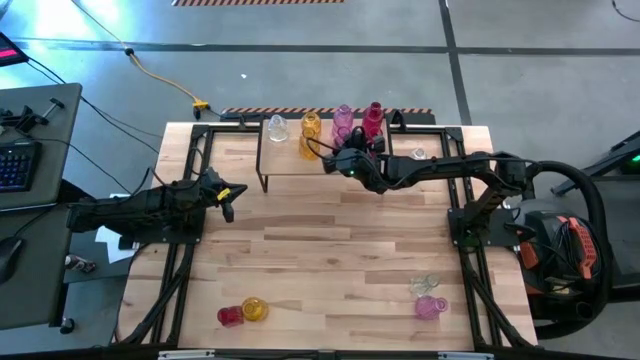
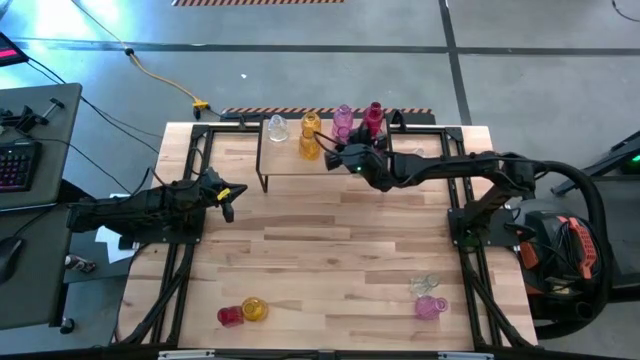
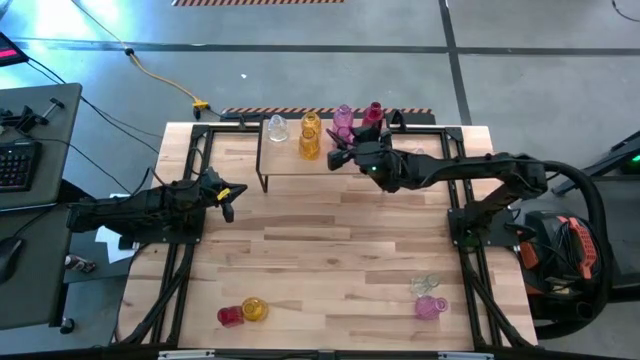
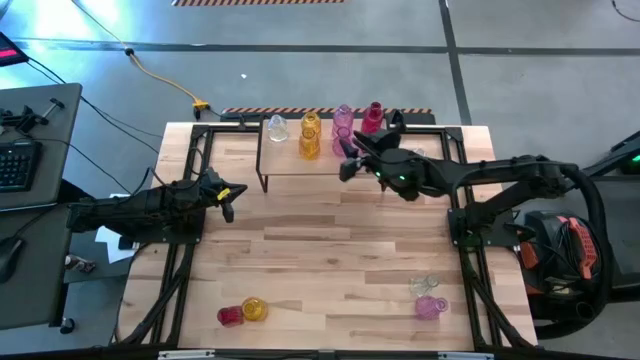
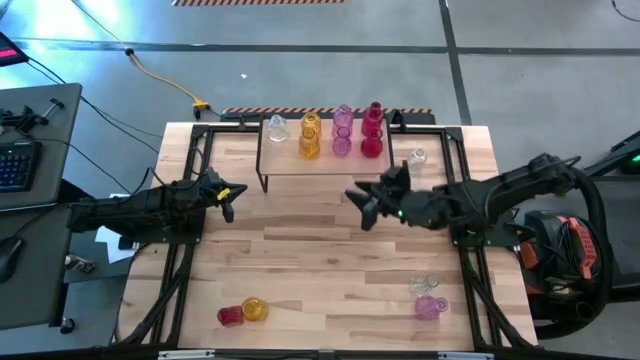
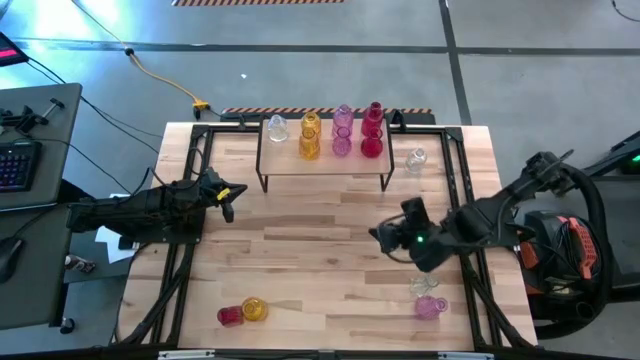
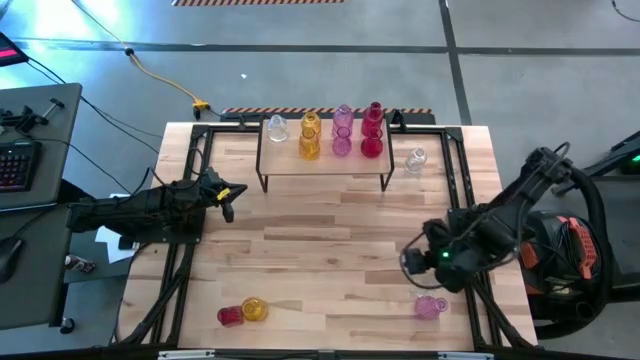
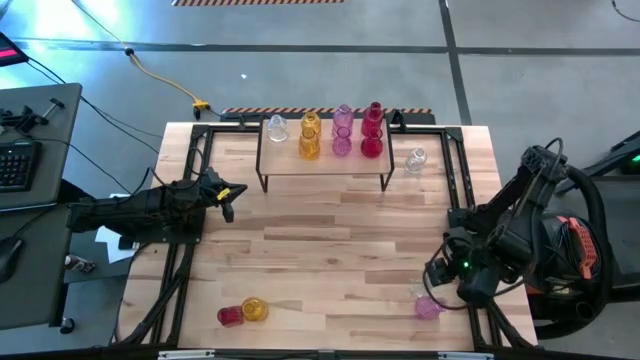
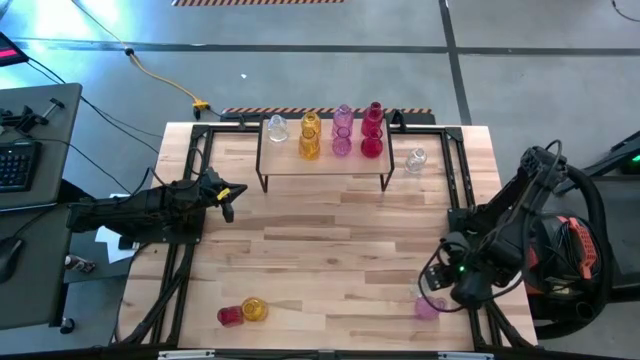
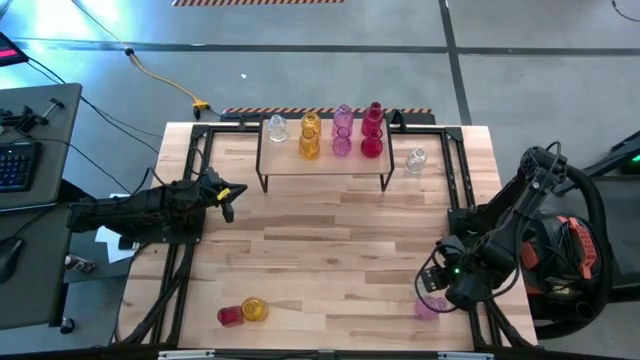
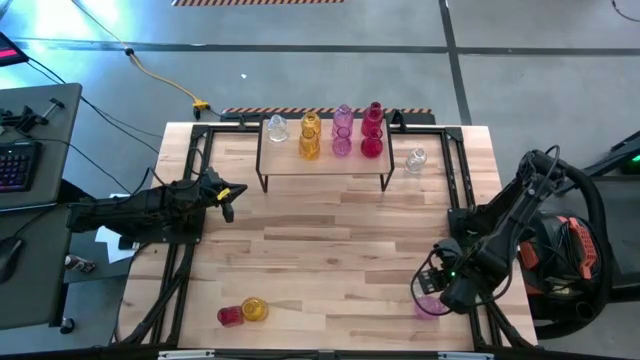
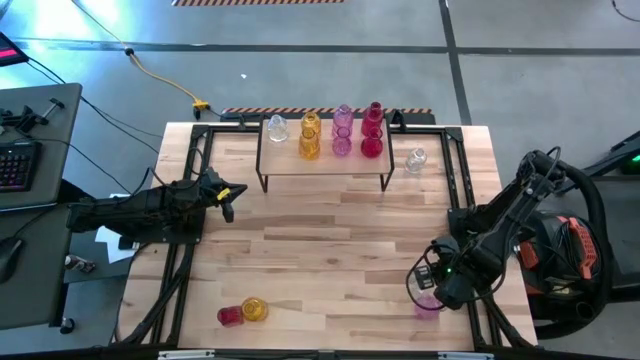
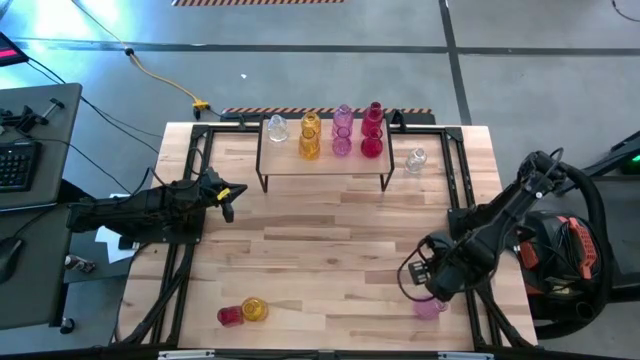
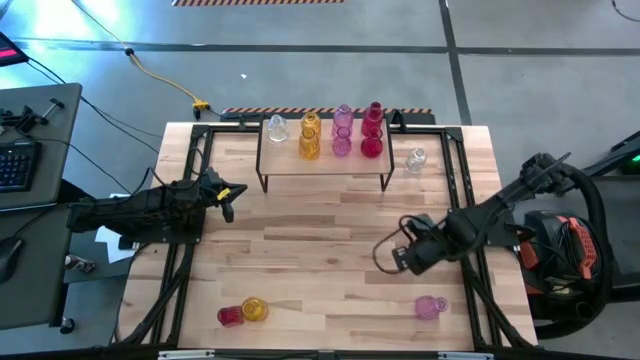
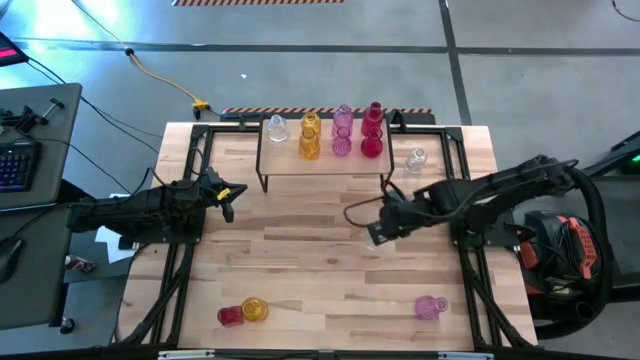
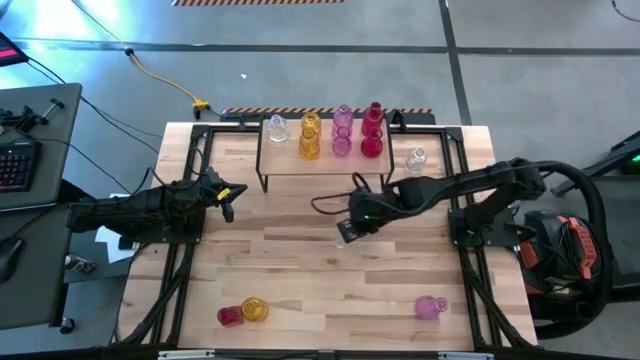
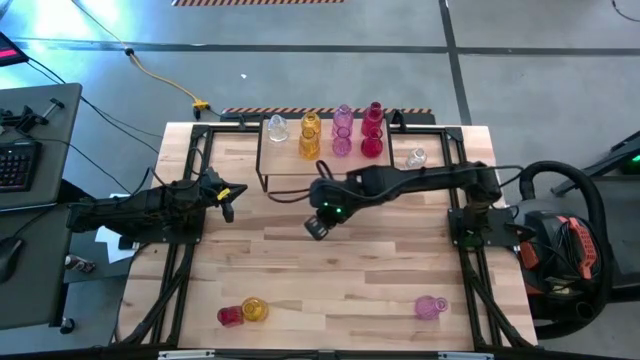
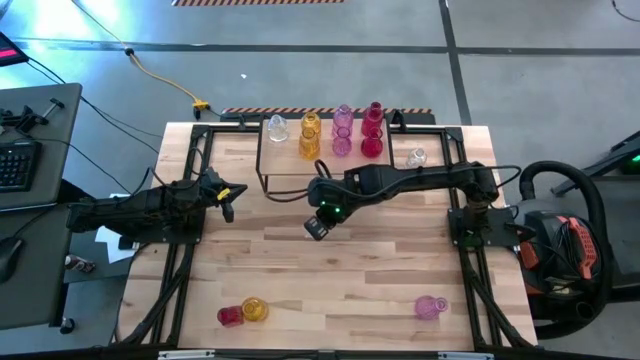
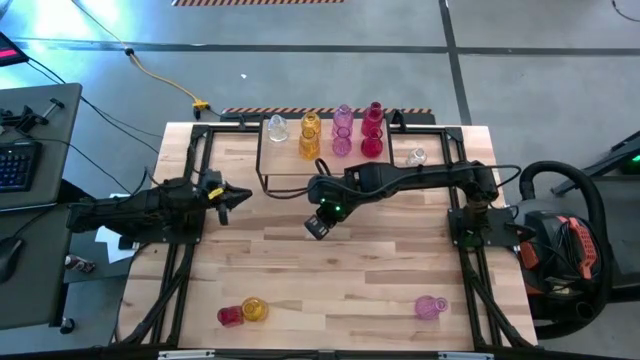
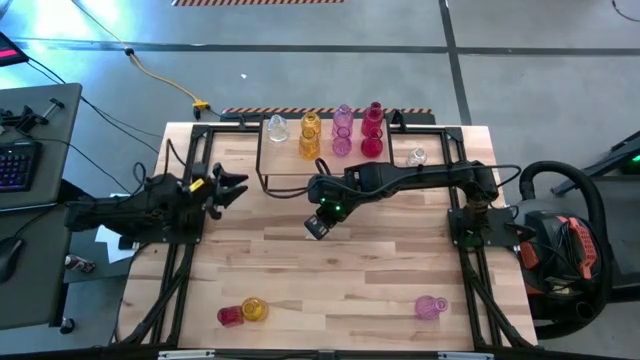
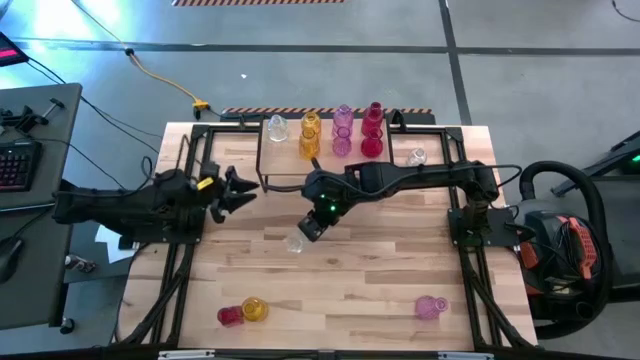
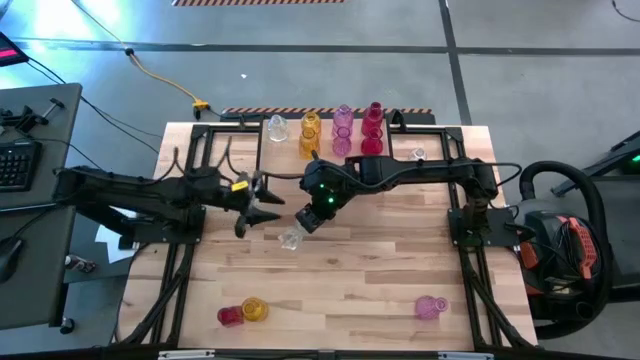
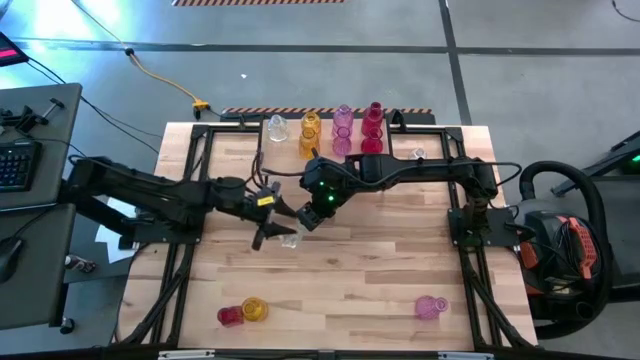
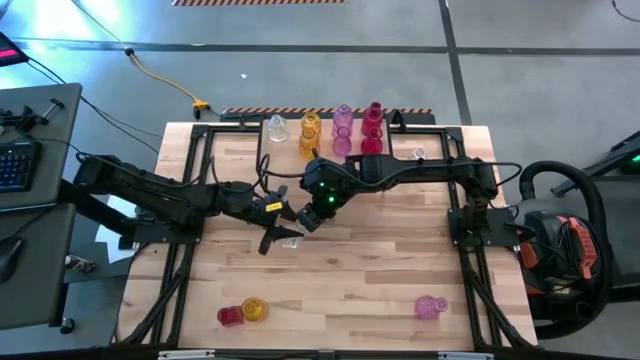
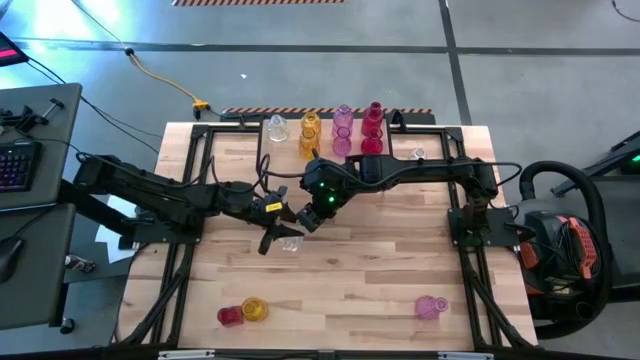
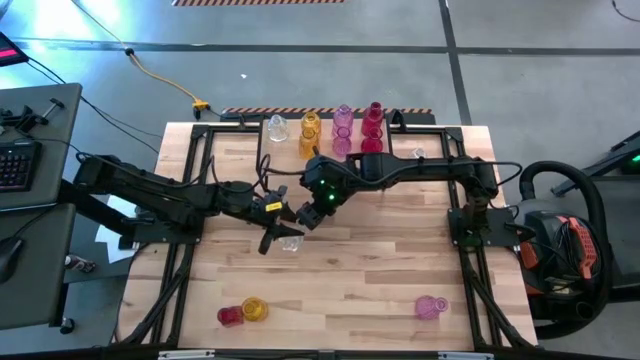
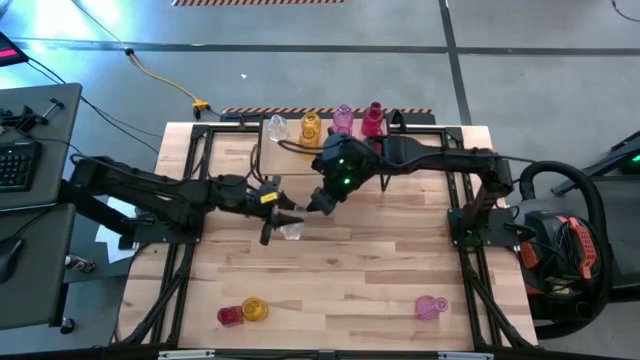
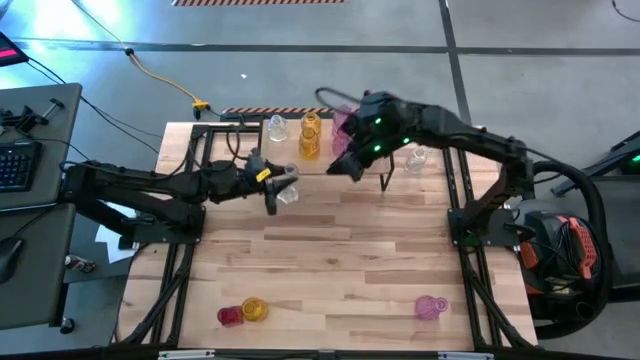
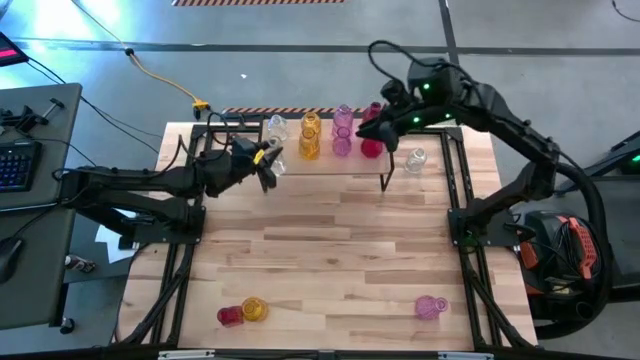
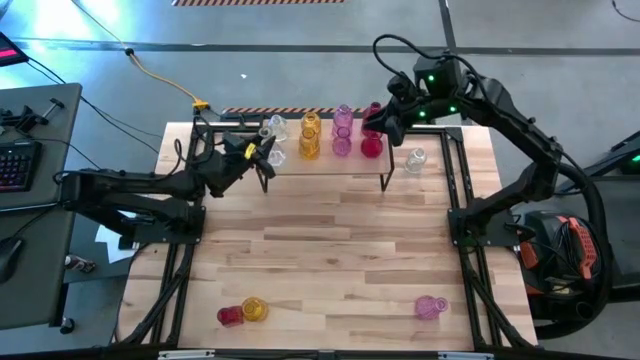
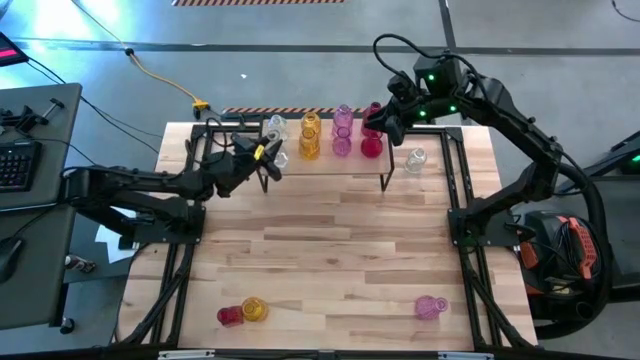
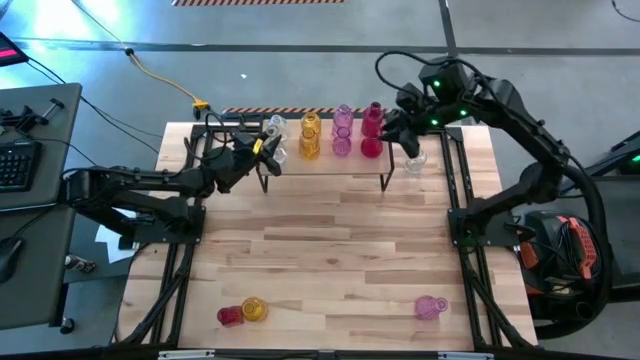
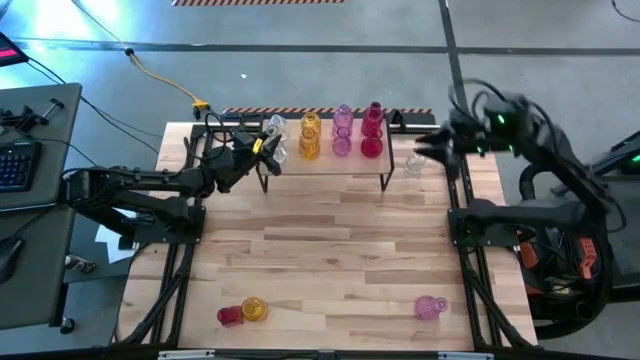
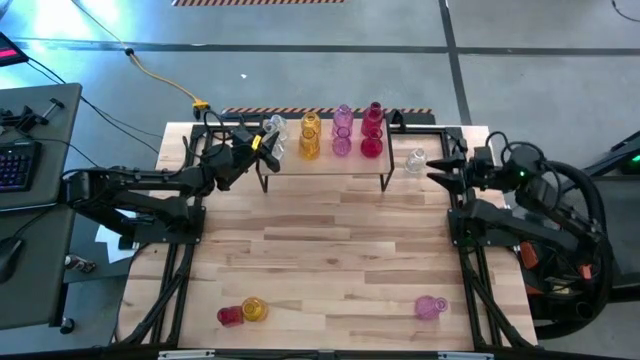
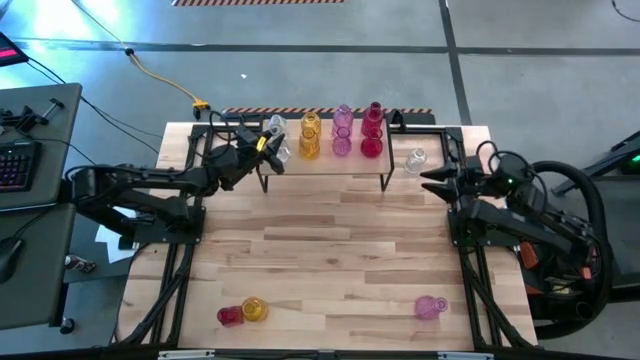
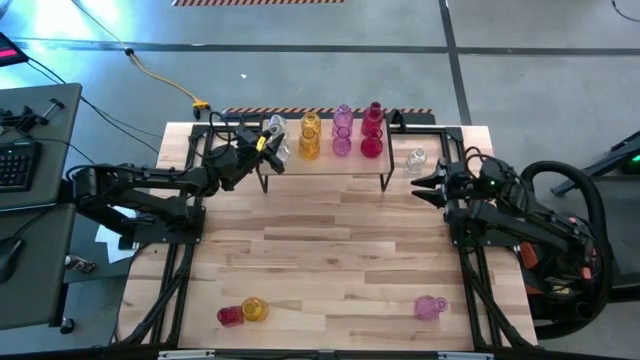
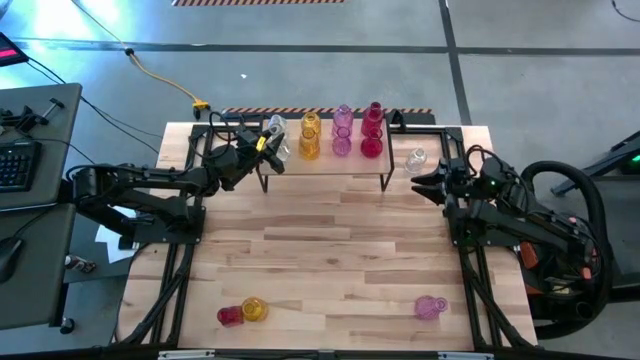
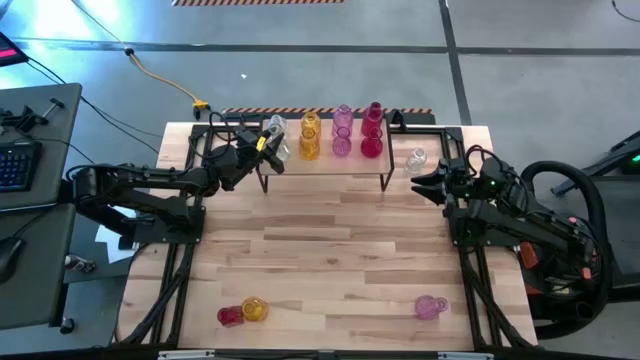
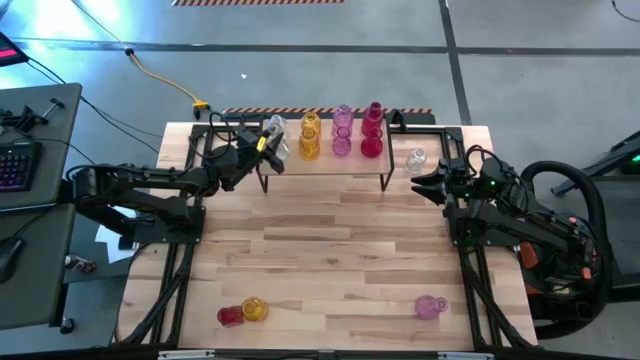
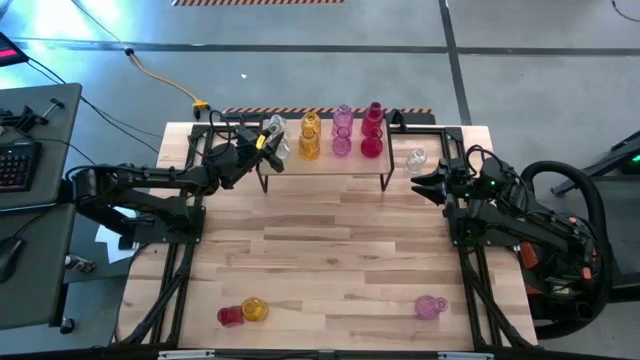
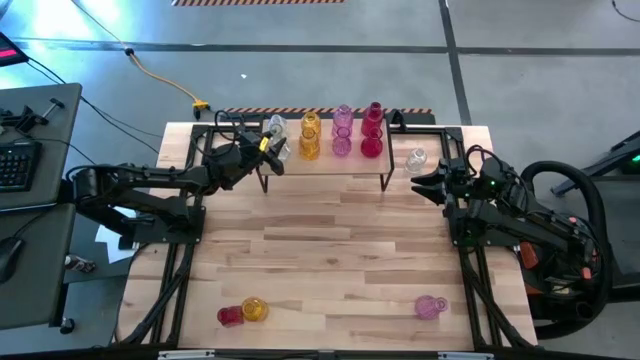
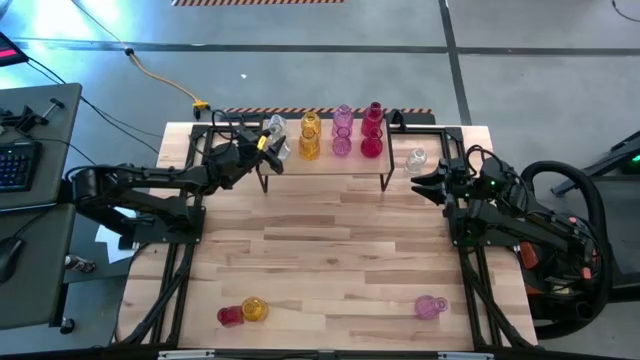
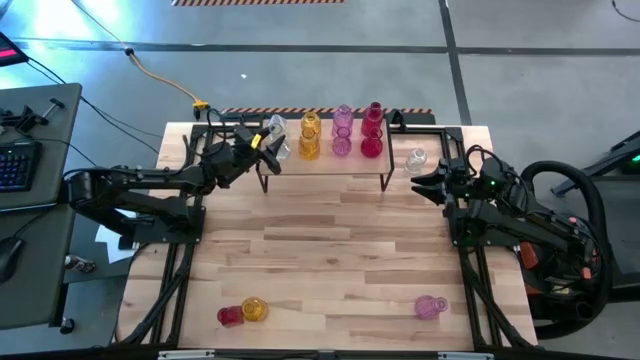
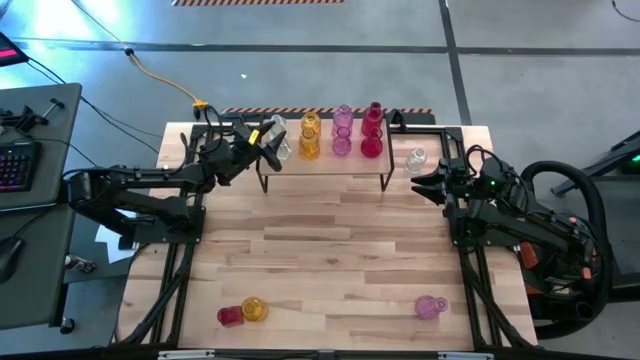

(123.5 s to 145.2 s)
Task: sort vases onto shelf
Put the bottom transparent vase aligned with the other transparent vase on the shelf
